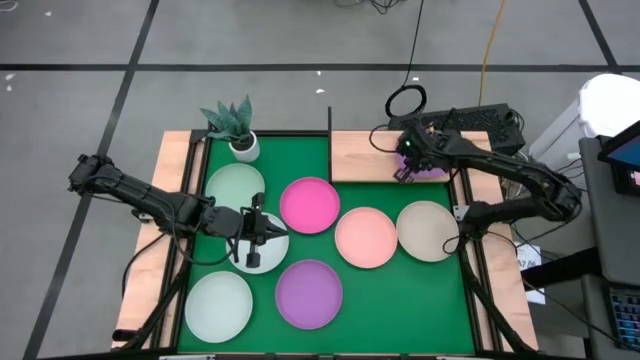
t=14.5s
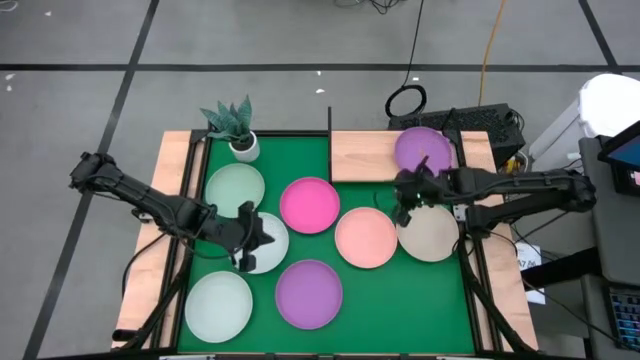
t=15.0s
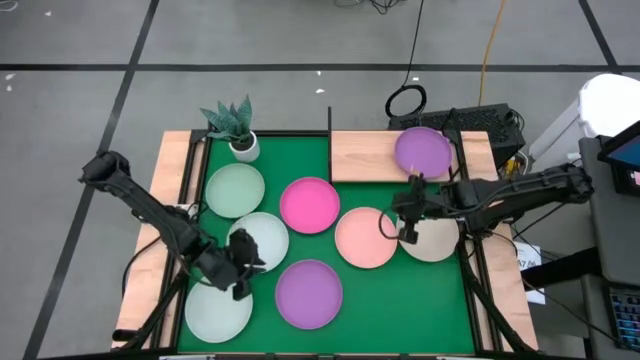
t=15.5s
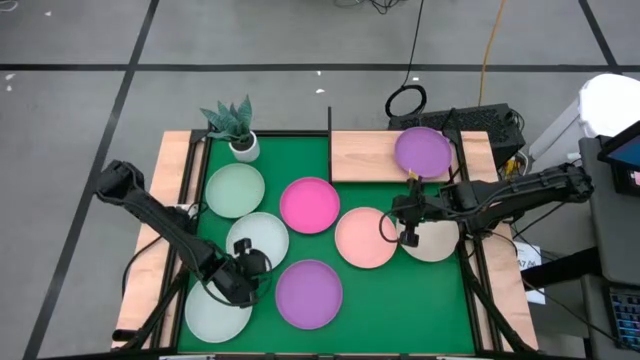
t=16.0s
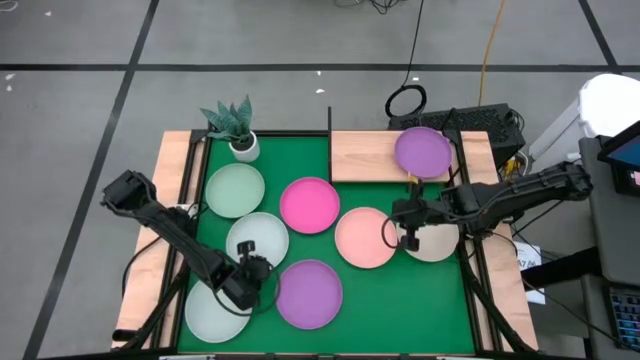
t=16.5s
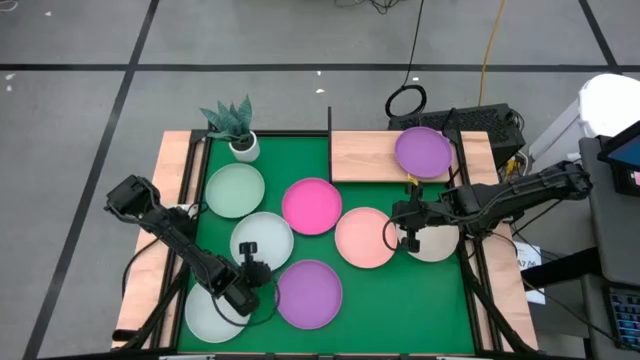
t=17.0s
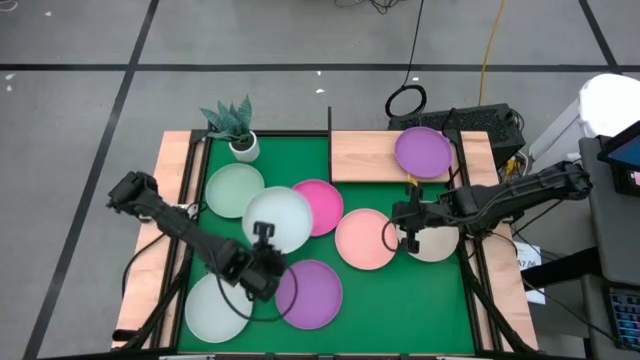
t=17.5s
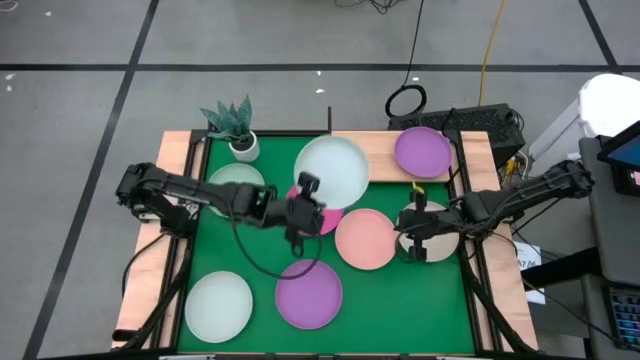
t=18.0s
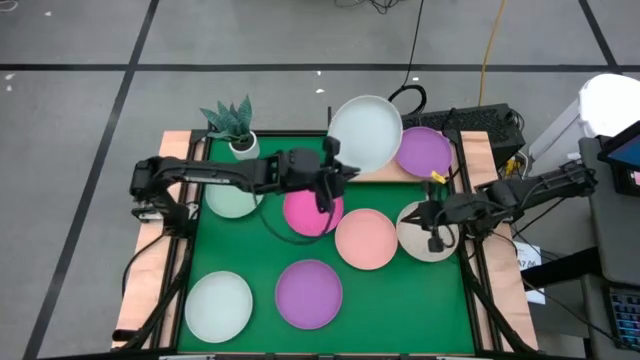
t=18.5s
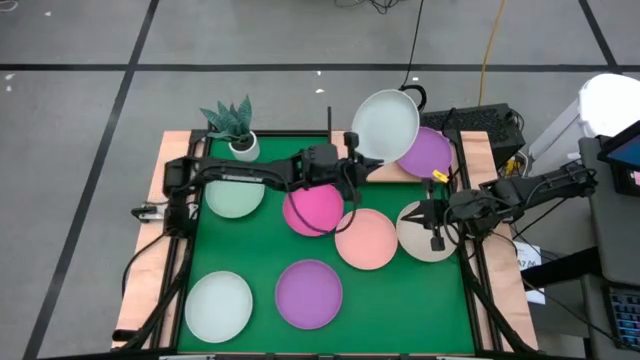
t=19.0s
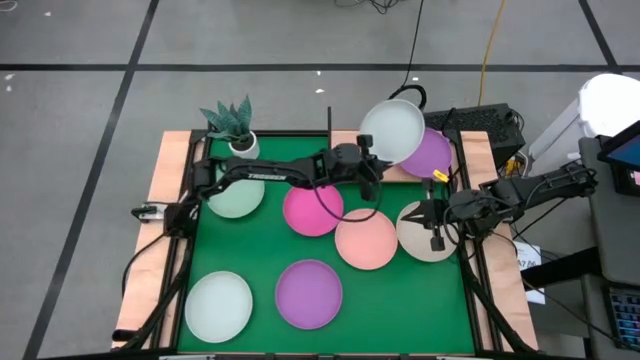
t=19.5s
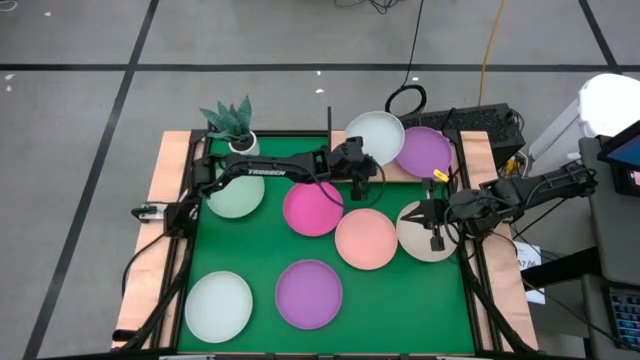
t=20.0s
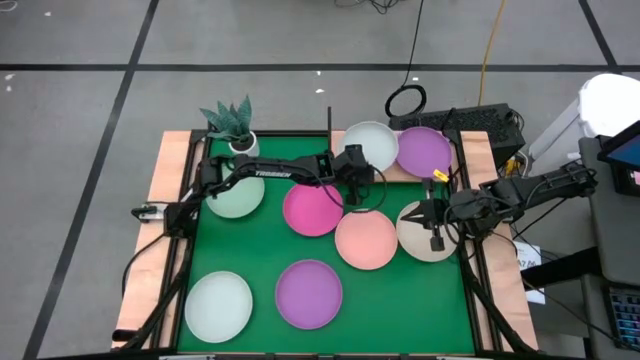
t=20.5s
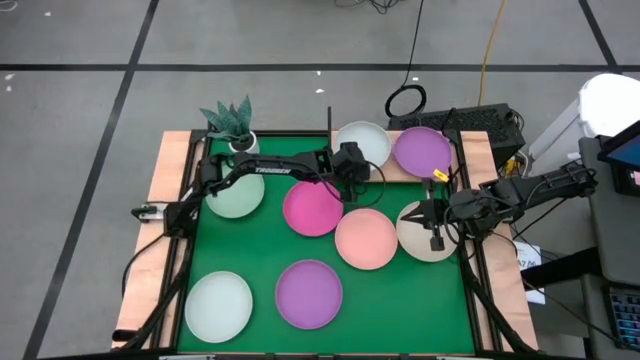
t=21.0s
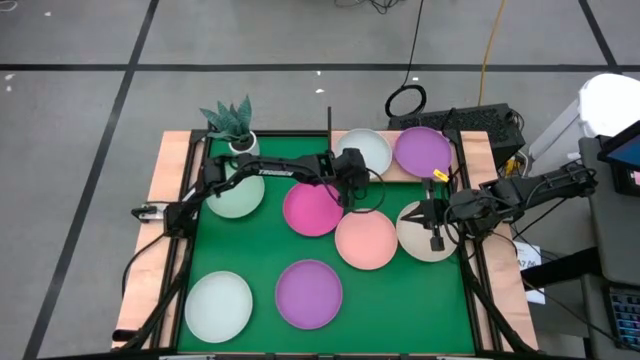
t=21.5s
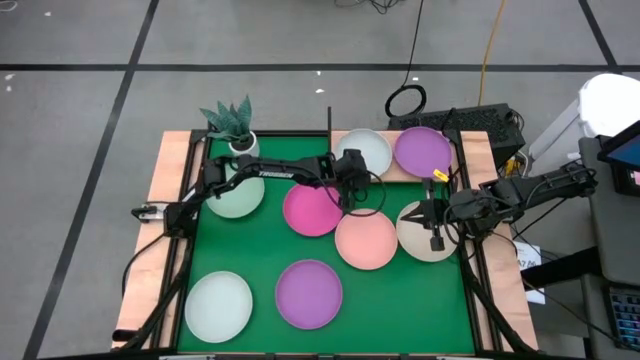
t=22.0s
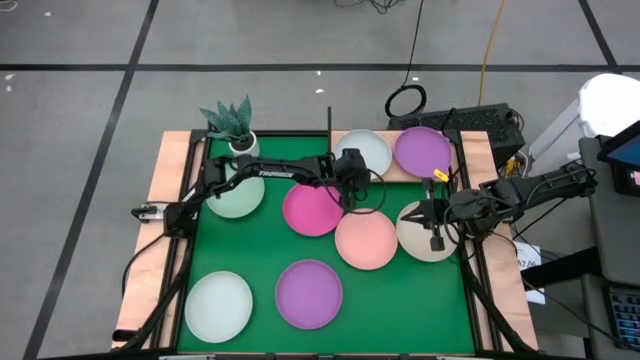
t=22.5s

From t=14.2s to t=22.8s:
Task: Place and stack plates onto a shelf
Put the top gray plate on the shelf

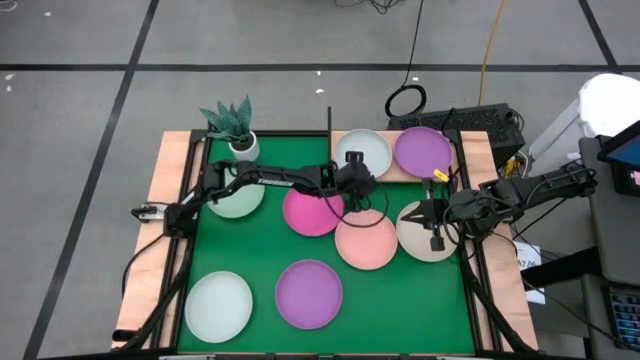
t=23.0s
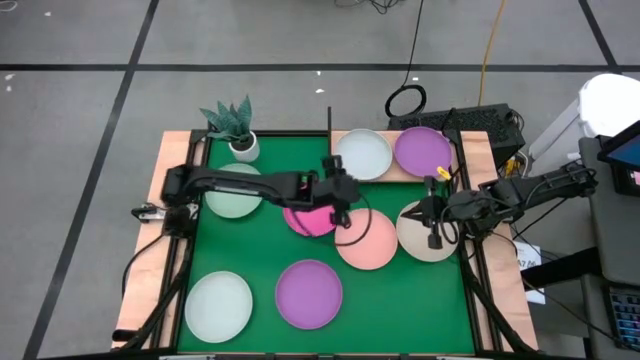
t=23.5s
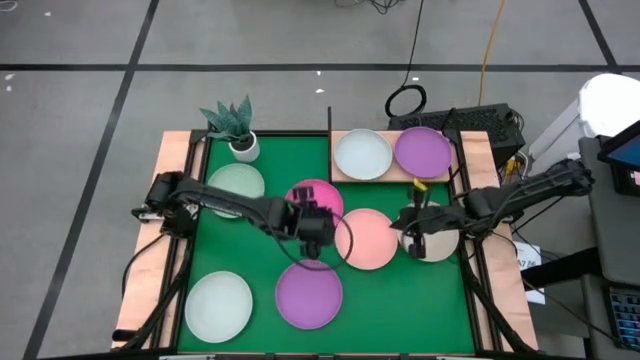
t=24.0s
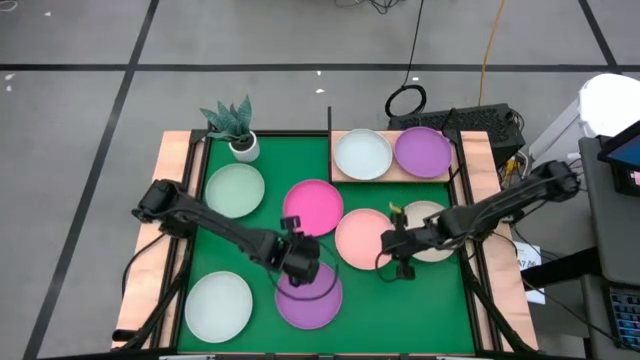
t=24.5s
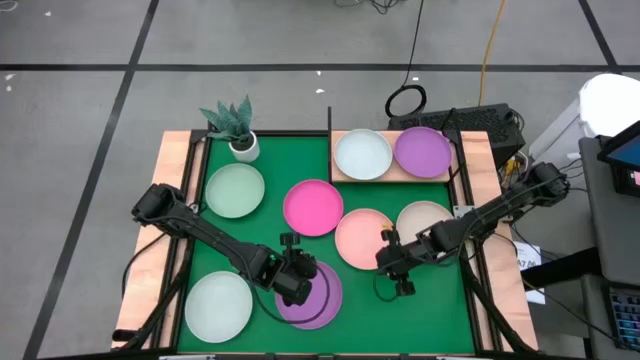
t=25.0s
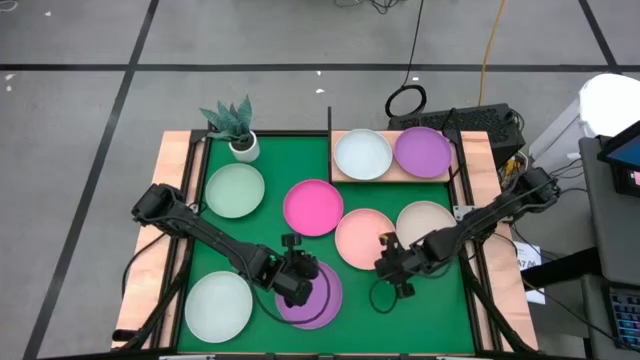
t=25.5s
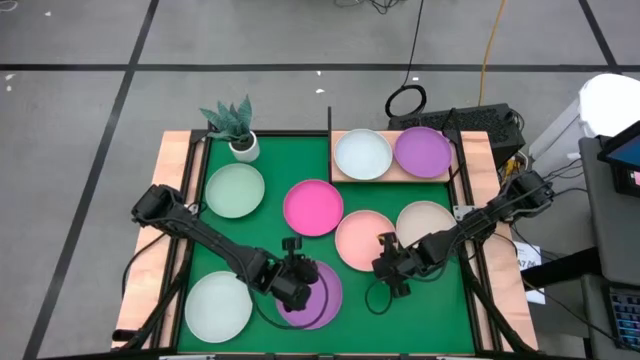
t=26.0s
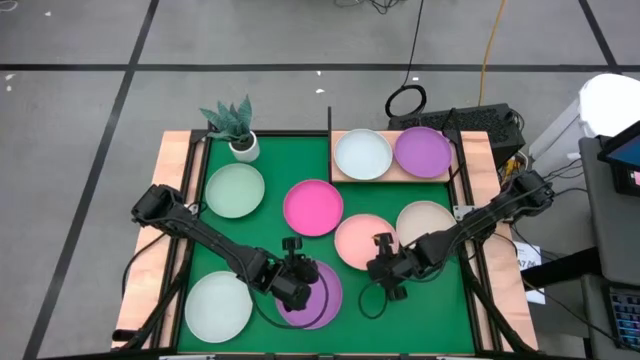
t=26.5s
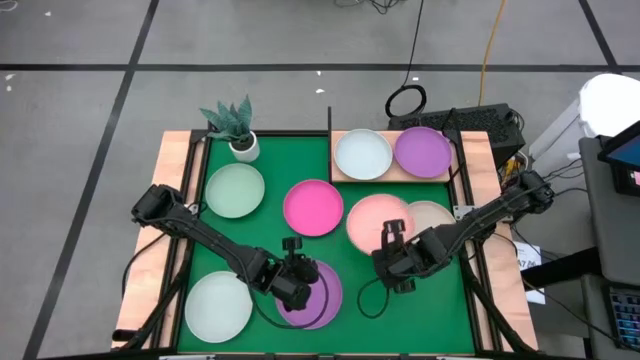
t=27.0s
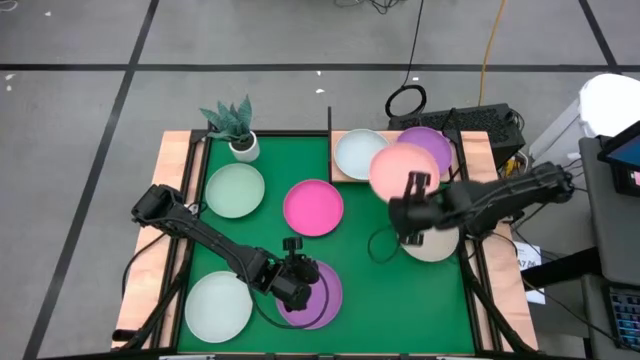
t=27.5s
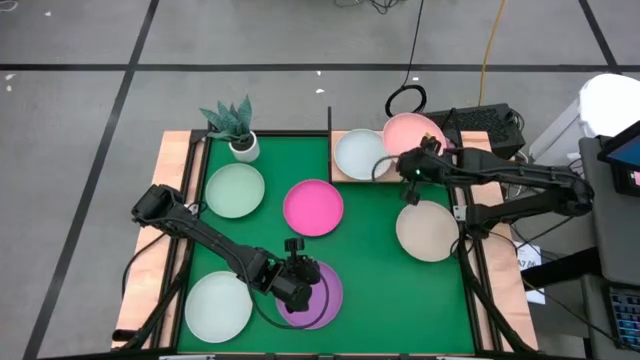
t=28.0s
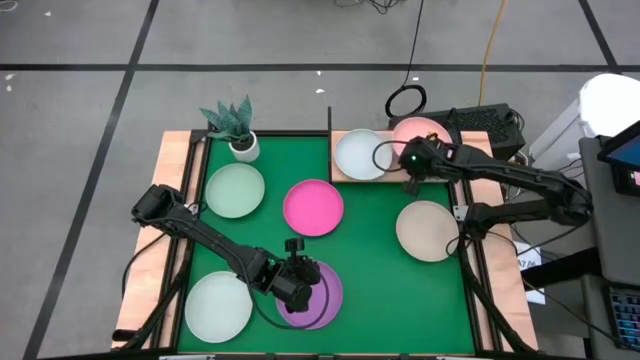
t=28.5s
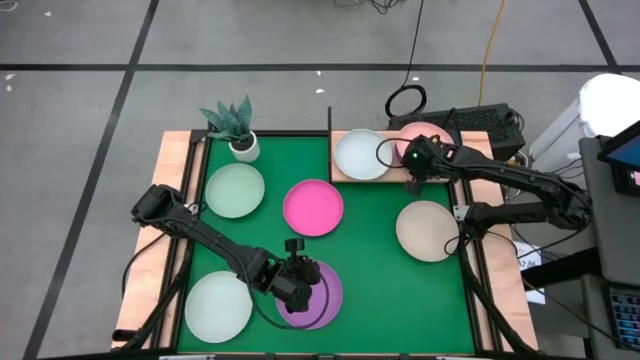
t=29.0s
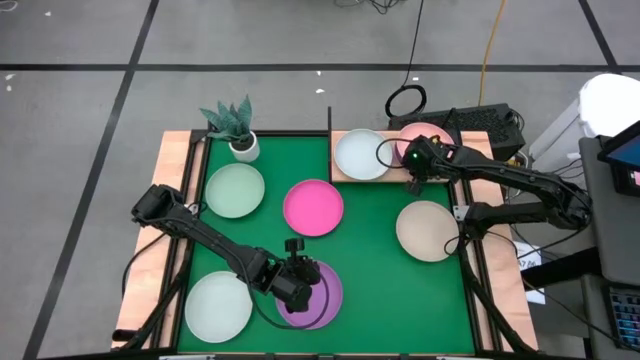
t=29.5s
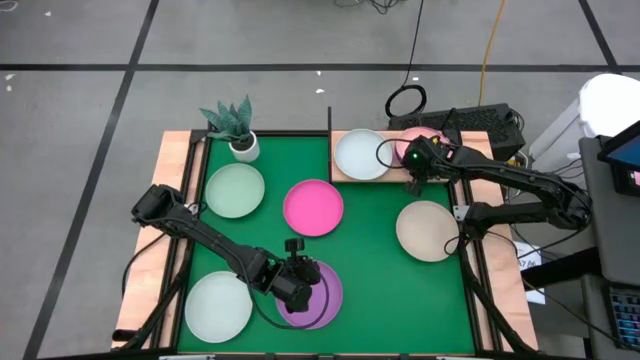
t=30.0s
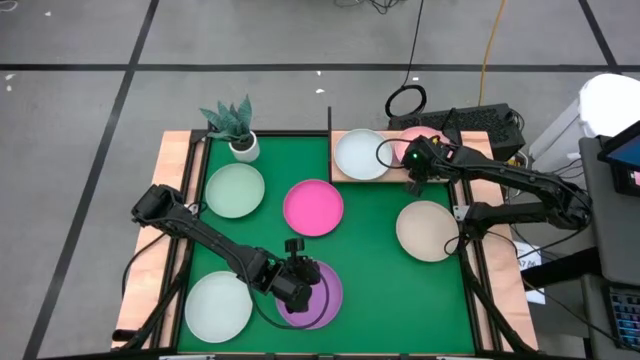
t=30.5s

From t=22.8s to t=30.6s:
Stack the orange plate on top of the purple plate on the shelf

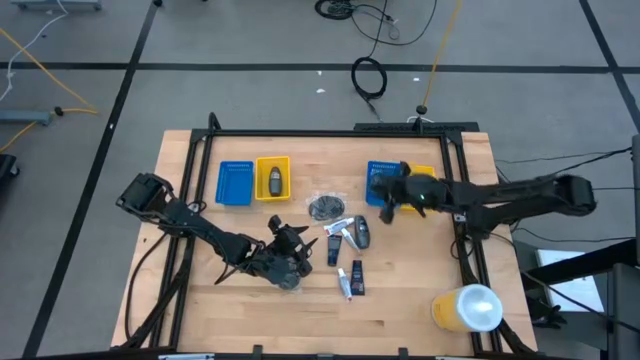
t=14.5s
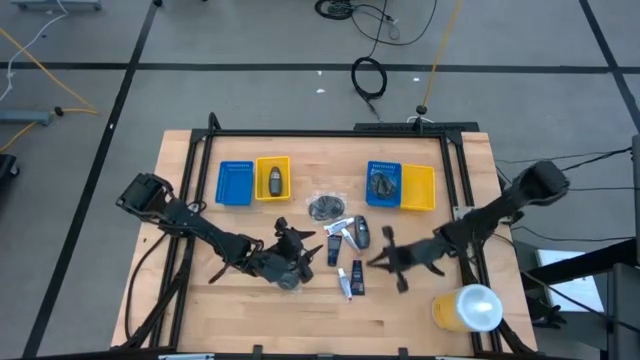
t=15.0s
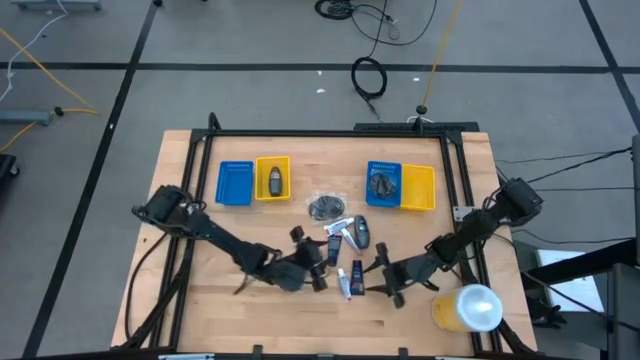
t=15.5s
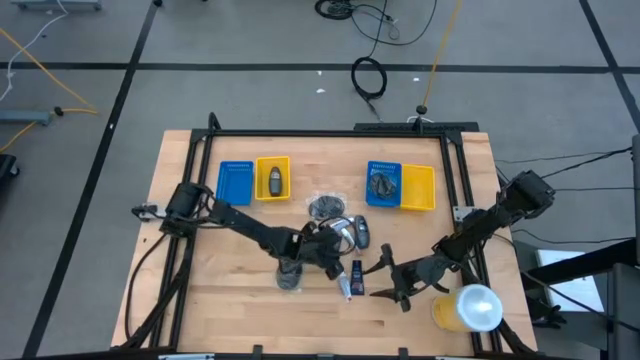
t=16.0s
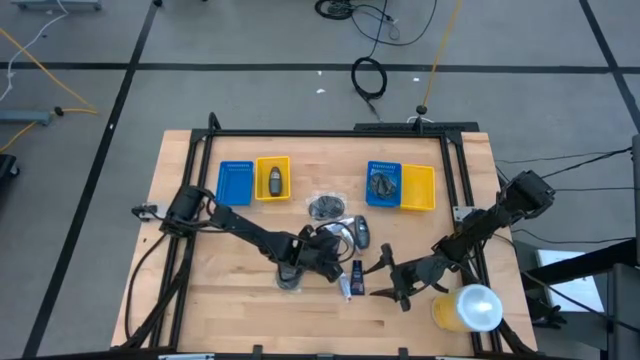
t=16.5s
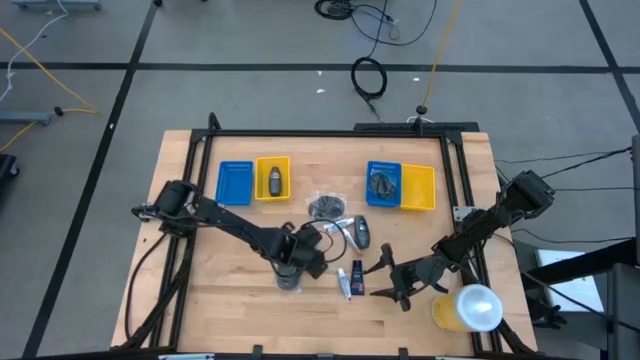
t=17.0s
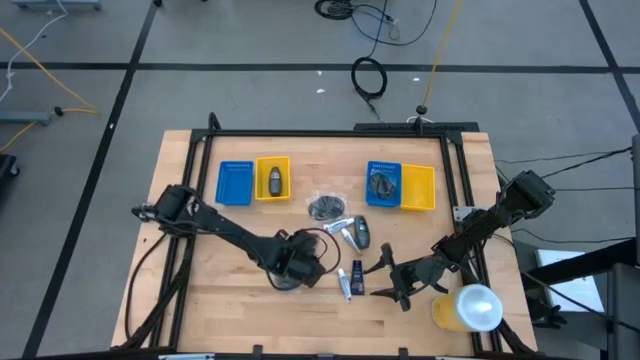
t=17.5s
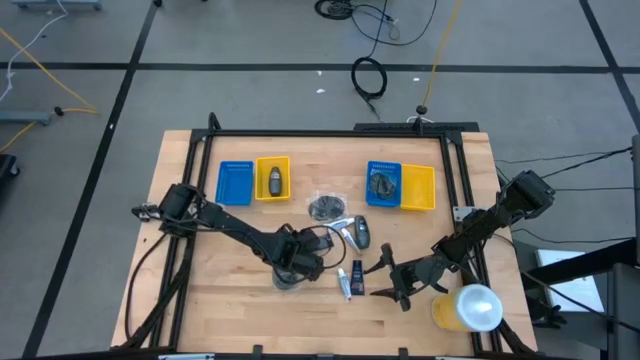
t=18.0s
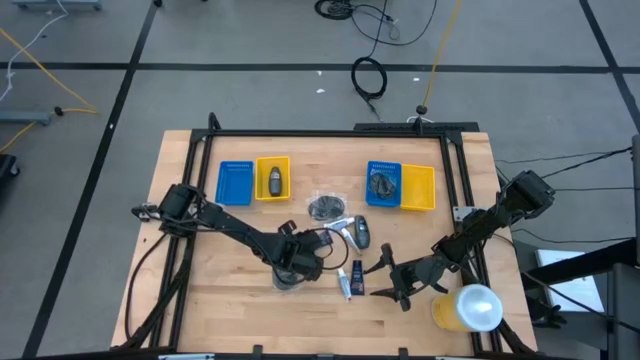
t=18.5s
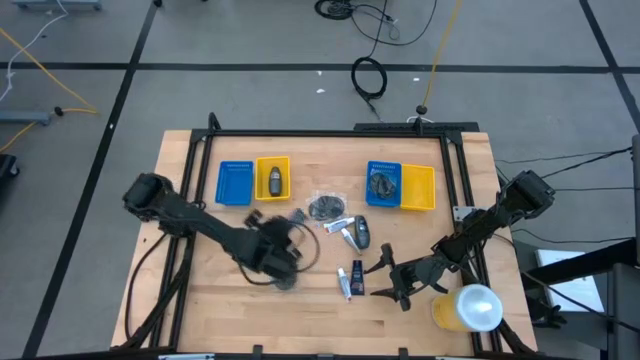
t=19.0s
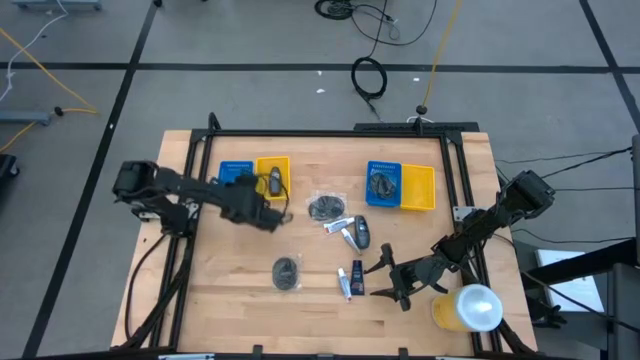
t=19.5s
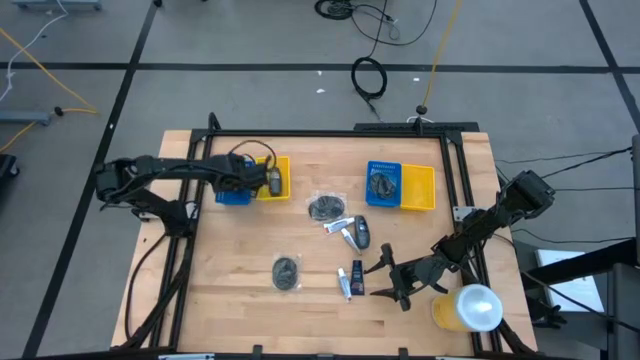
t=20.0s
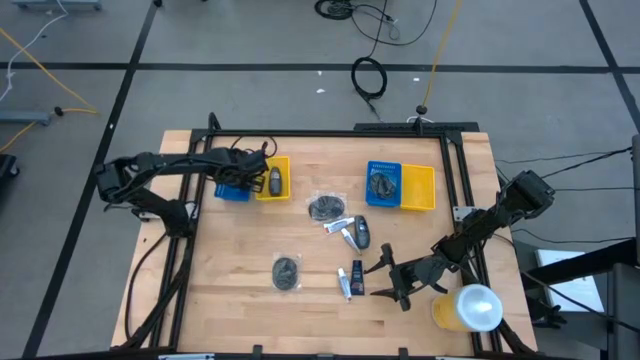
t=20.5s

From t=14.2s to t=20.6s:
Task: Pick & Place Travel size toiletries
Put the blue shave cream into the left blue bin
